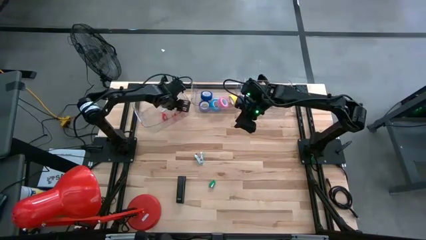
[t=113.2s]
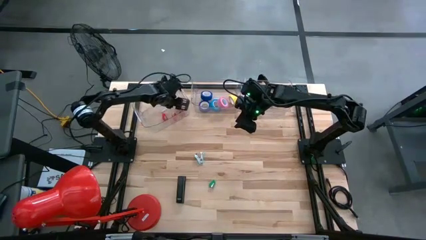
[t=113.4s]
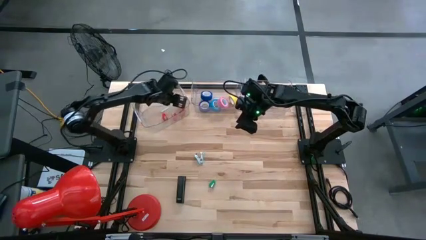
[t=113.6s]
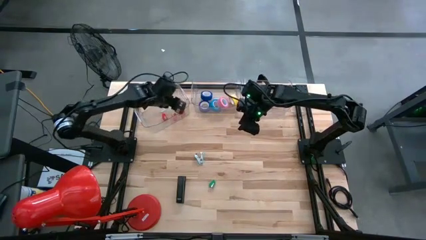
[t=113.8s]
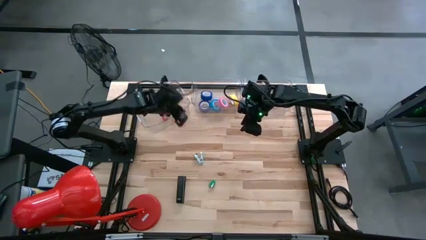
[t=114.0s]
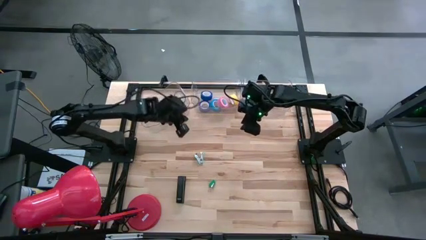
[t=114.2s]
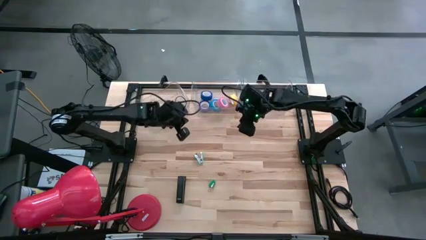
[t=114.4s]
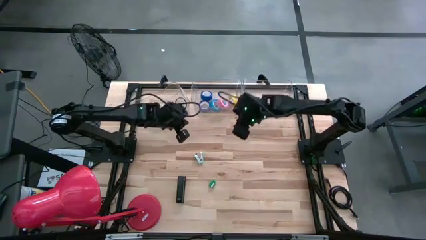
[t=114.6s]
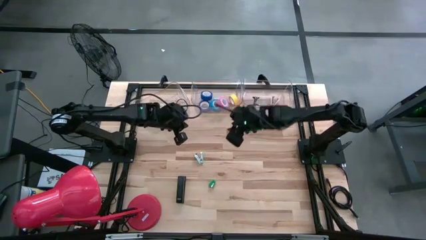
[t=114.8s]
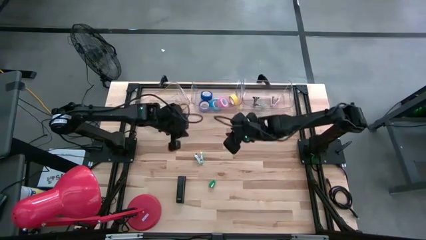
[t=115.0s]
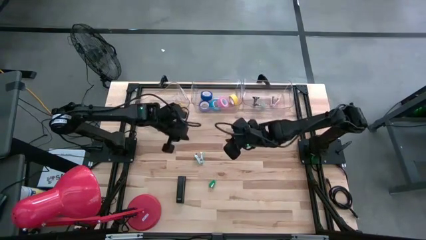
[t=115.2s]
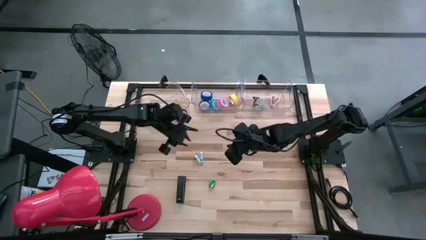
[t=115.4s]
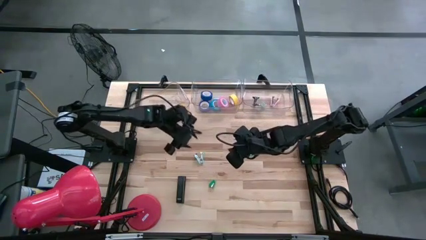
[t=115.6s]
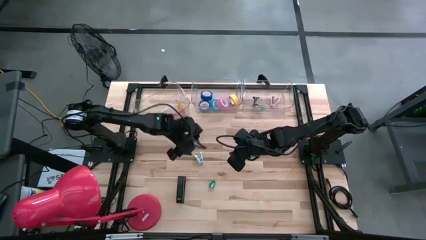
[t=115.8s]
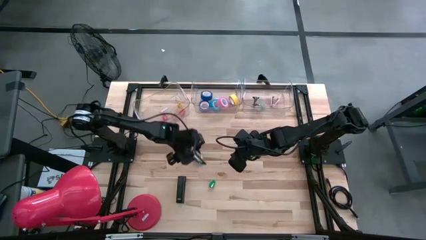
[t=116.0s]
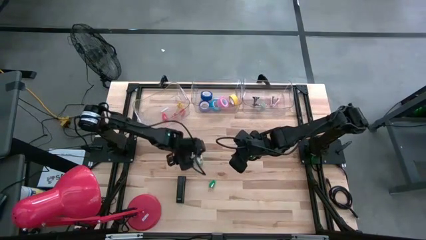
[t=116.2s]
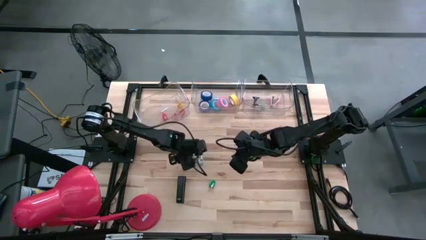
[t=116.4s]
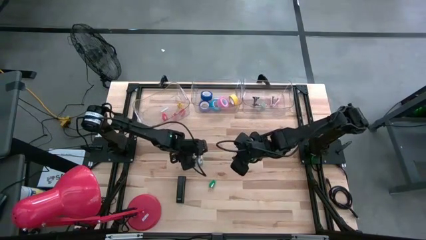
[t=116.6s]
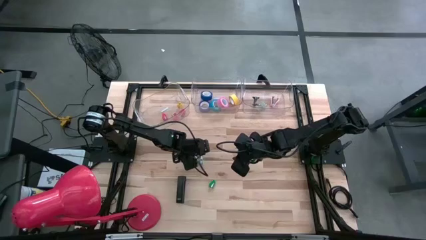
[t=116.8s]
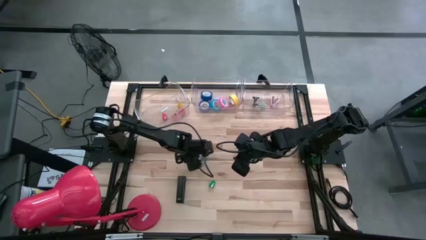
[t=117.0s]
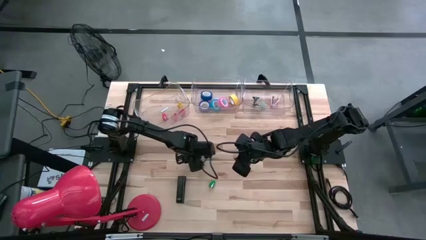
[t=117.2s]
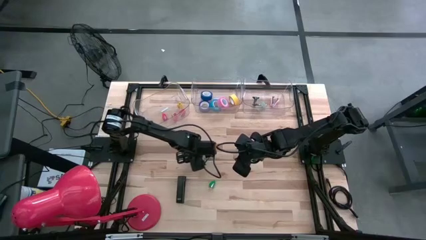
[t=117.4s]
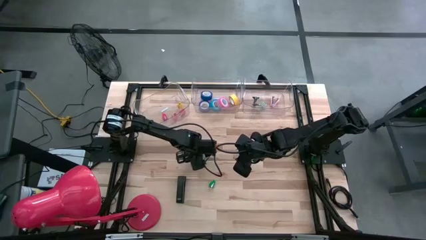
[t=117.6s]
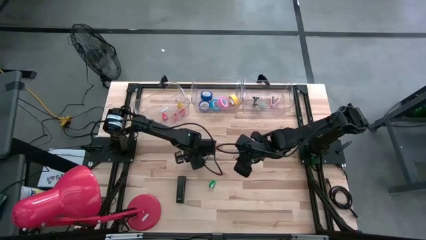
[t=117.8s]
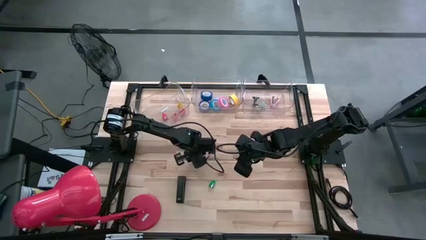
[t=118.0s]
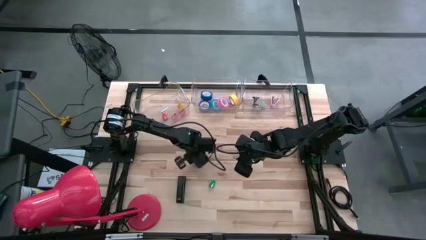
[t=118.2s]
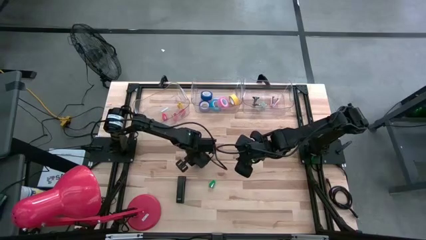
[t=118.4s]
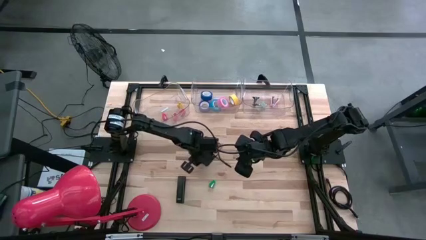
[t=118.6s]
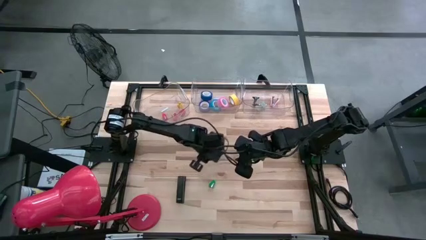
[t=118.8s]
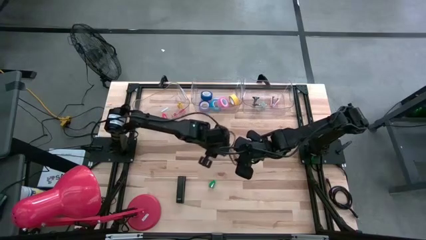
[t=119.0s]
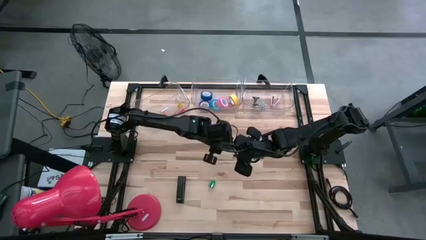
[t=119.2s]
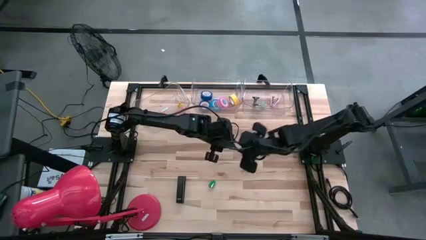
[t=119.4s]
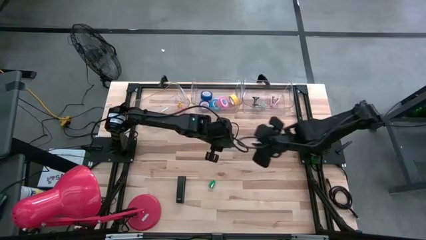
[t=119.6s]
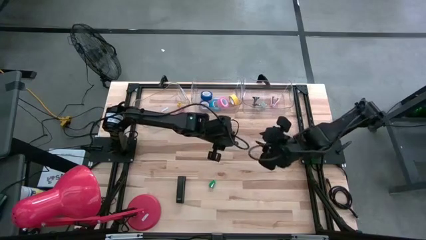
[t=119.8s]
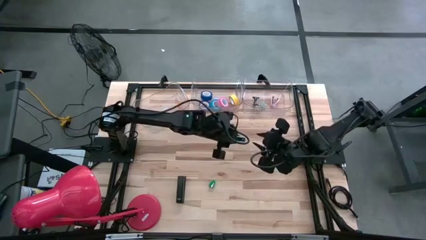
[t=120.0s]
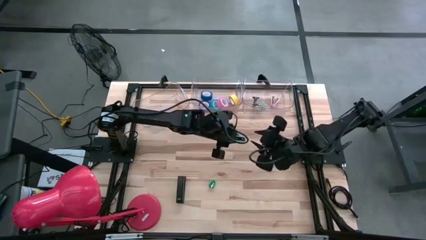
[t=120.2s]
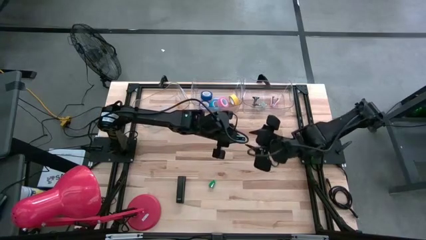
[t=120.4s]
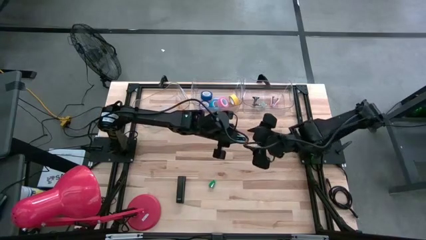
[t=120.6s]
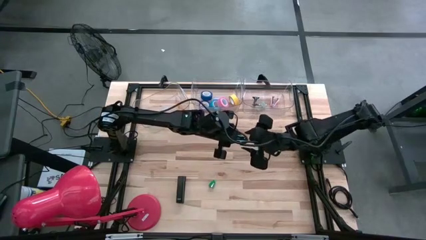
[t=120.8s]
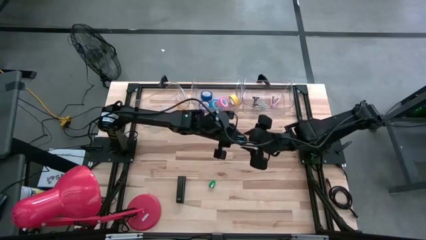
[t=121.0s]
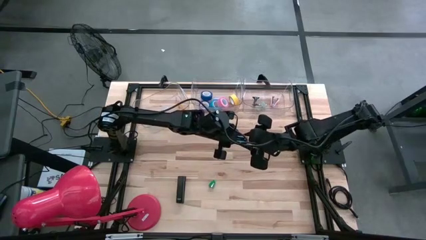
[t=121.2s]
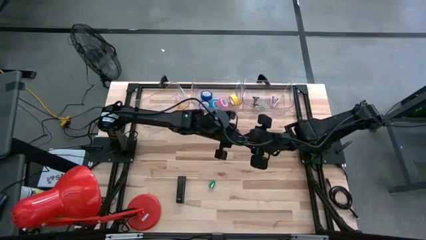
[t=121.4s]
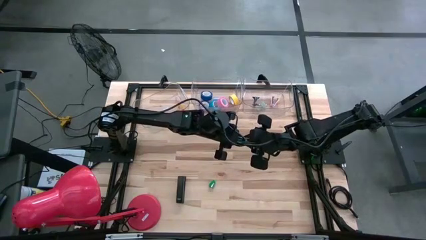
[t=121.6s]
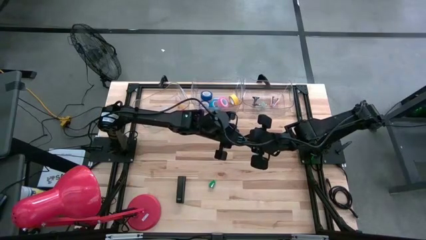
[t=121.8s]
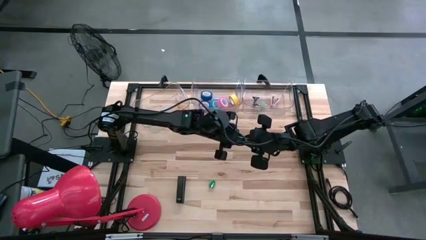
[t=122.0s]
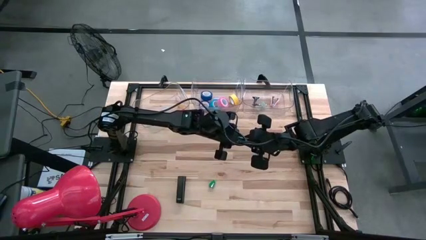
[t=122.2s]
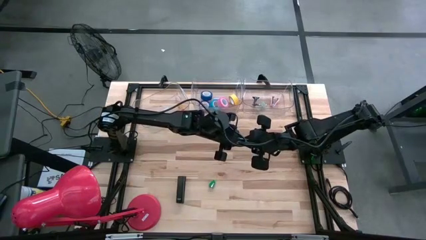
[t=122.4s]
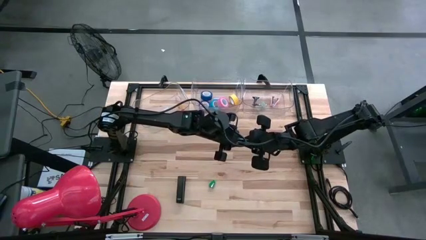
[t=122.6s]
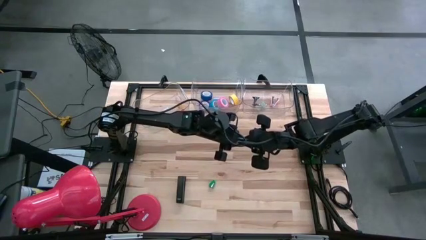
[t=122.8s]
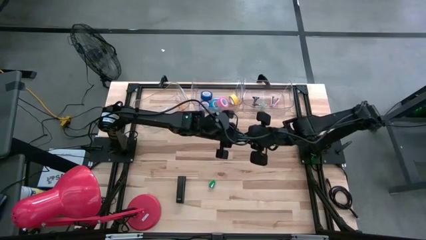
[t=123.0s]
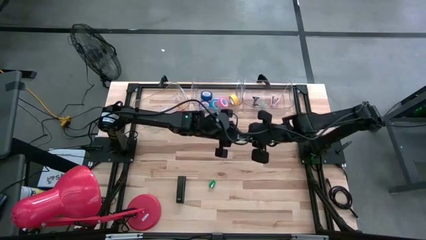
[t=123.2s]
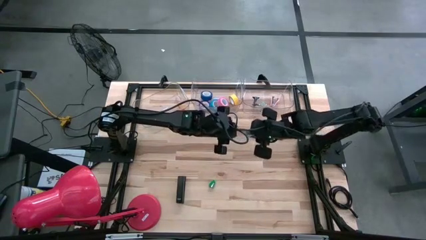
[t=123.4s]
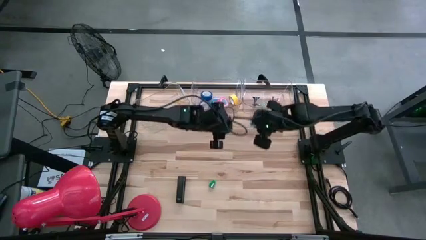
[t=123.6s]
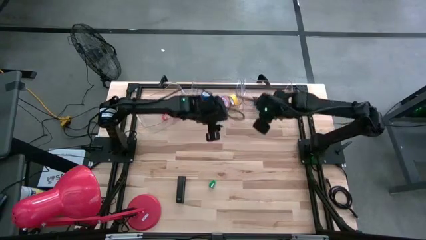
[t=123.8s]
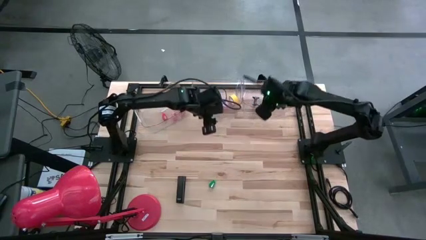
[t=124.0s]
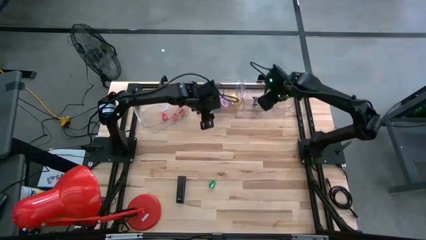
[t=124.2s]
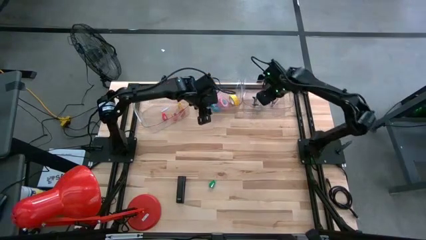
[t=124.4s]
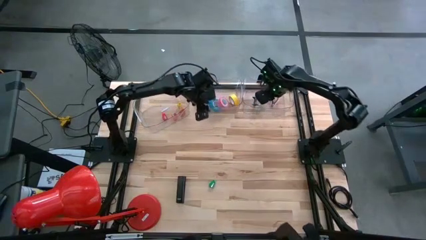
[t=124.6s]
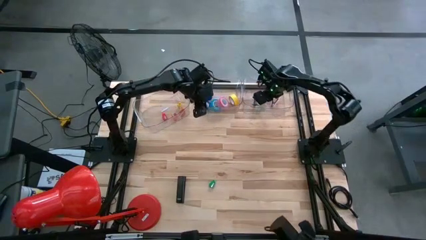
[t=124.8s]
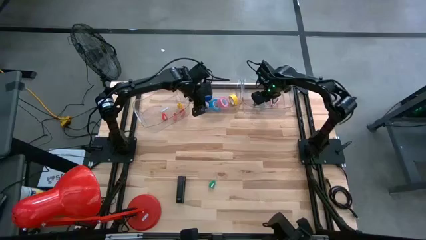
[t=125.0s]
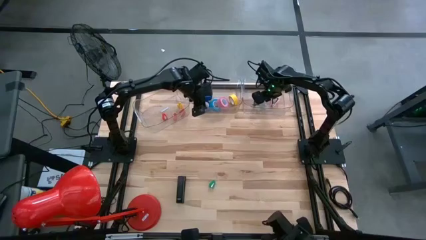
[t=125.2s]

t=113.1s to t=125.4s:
Task: Pick and place Stapler, Stapler remover, tape
Put the blue staple remover into the right transparent bin
